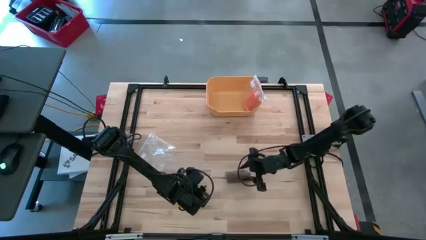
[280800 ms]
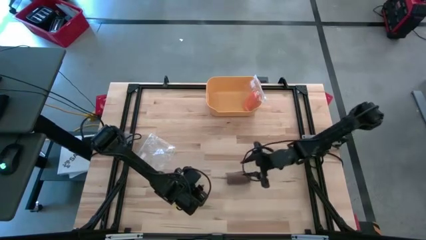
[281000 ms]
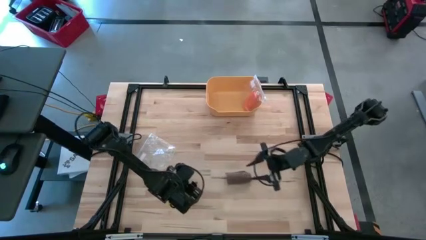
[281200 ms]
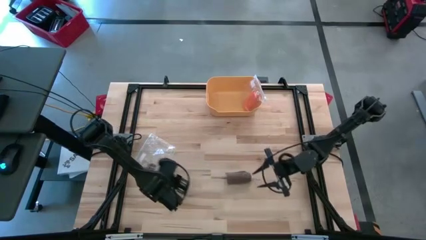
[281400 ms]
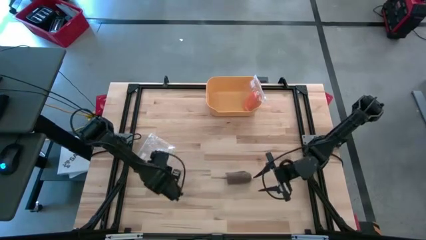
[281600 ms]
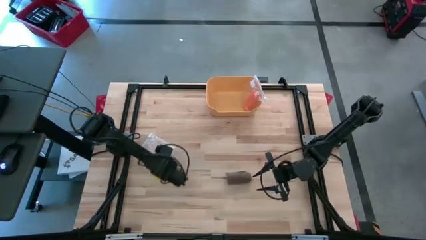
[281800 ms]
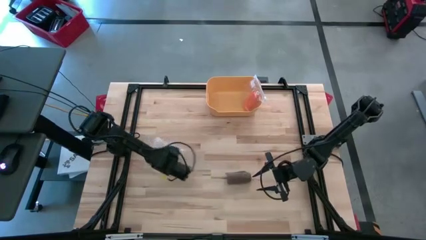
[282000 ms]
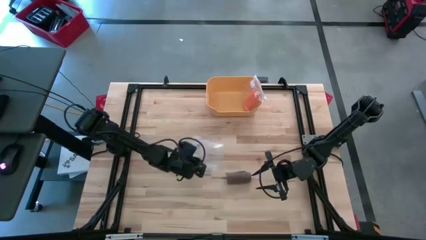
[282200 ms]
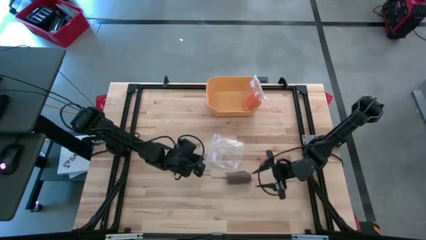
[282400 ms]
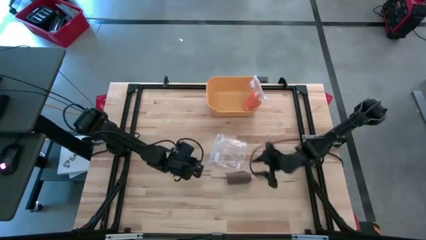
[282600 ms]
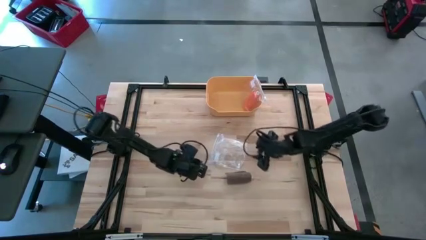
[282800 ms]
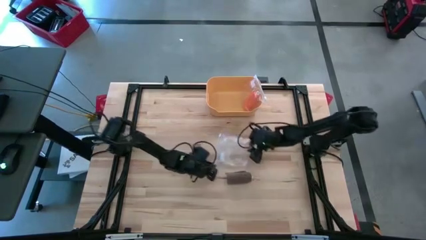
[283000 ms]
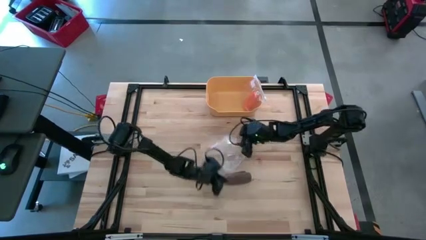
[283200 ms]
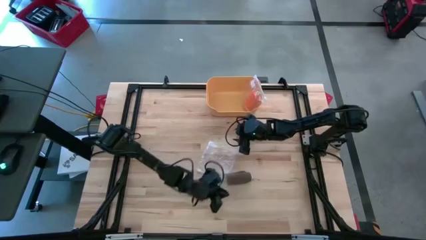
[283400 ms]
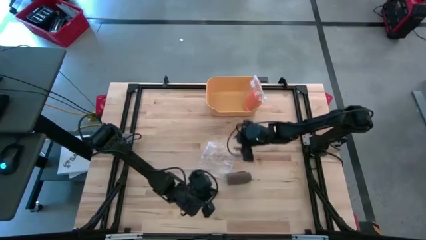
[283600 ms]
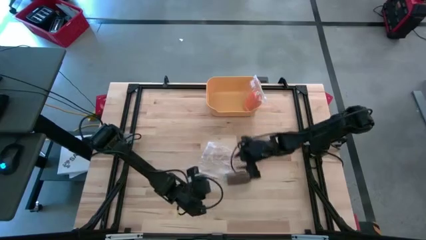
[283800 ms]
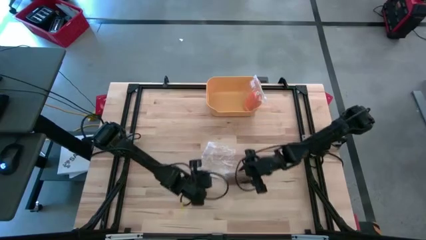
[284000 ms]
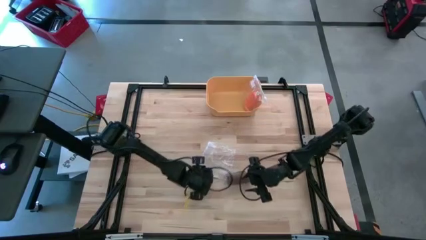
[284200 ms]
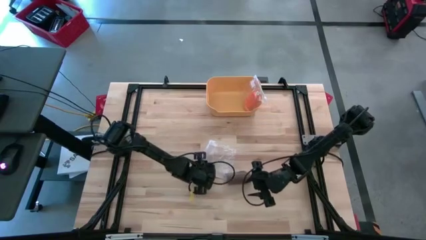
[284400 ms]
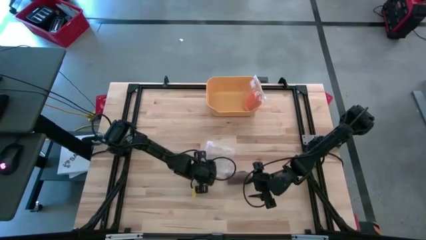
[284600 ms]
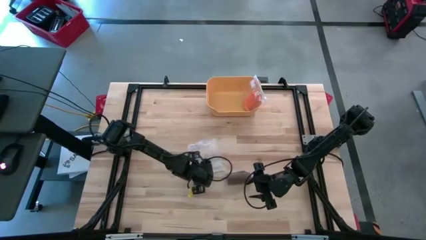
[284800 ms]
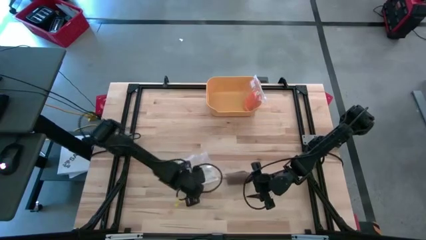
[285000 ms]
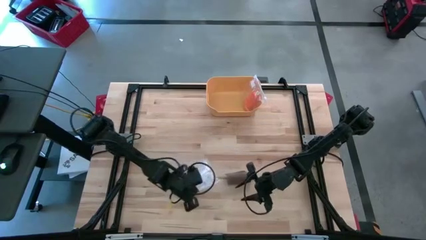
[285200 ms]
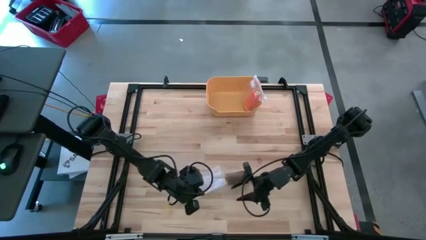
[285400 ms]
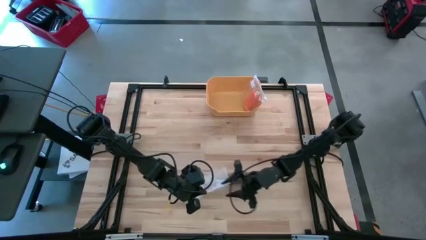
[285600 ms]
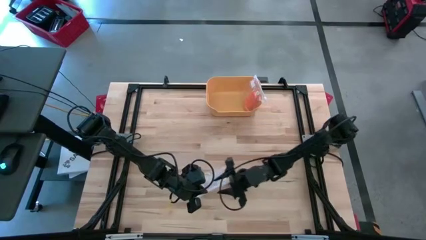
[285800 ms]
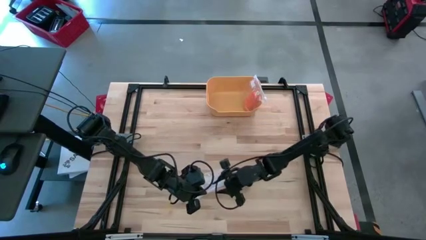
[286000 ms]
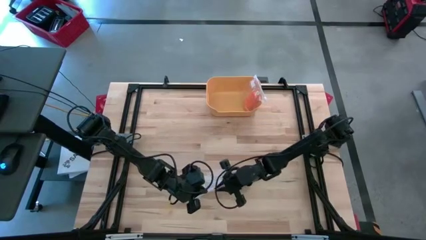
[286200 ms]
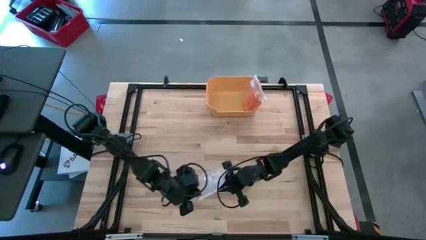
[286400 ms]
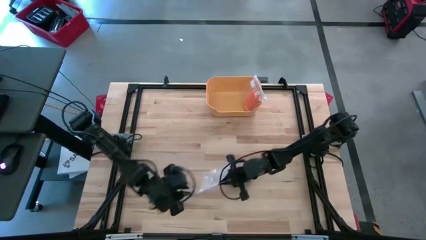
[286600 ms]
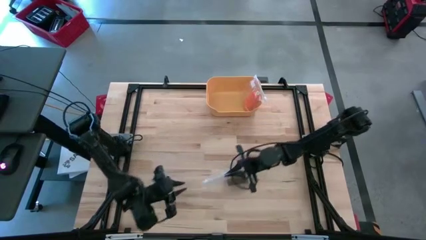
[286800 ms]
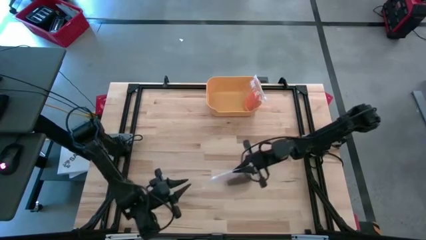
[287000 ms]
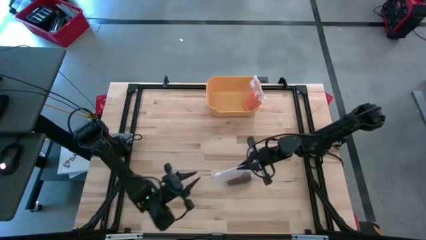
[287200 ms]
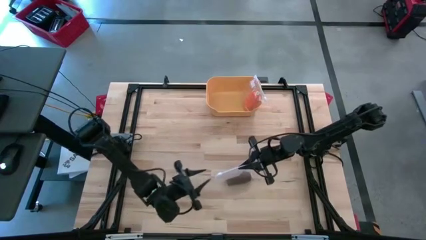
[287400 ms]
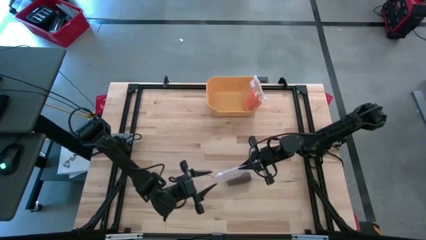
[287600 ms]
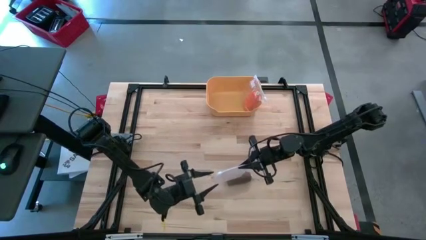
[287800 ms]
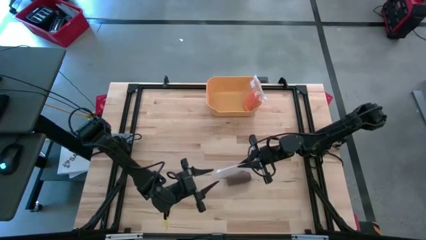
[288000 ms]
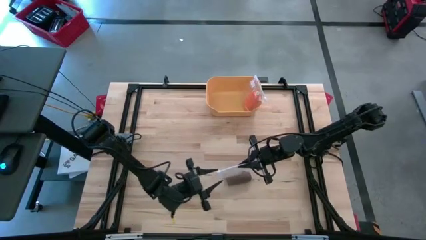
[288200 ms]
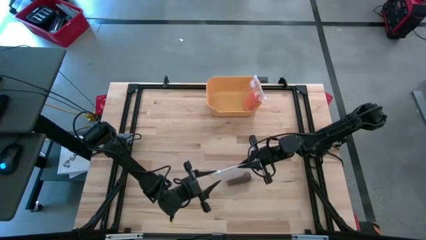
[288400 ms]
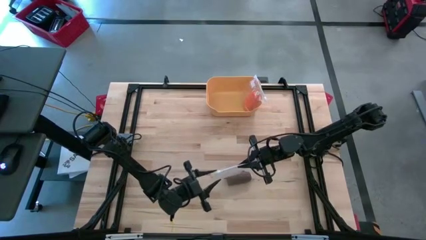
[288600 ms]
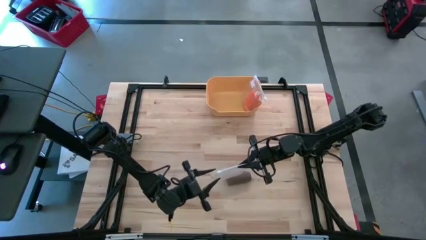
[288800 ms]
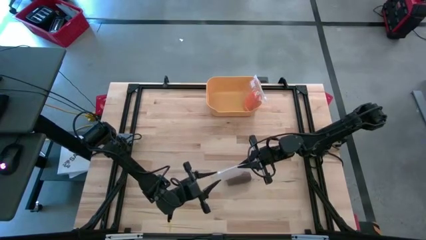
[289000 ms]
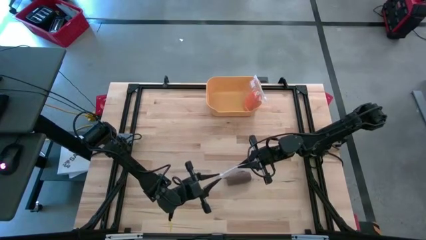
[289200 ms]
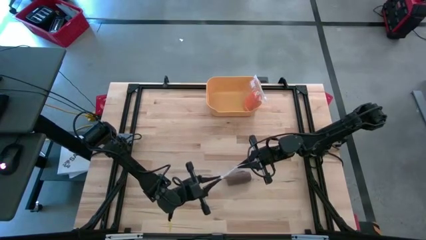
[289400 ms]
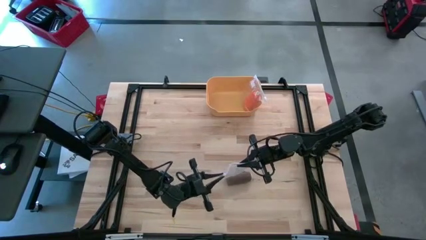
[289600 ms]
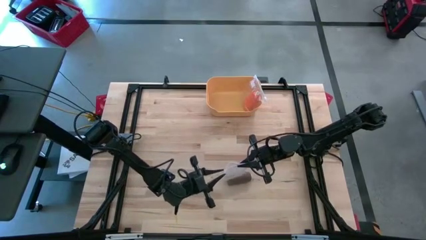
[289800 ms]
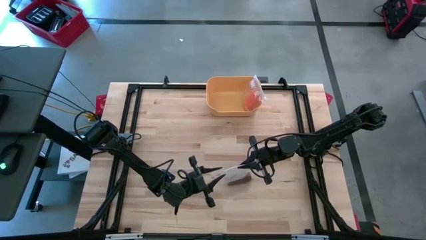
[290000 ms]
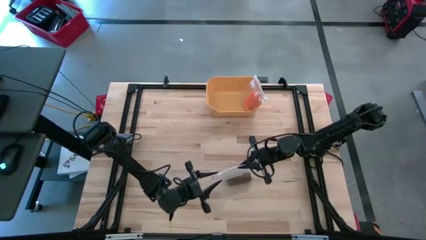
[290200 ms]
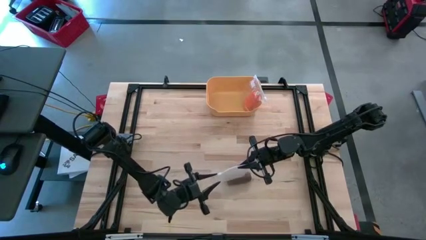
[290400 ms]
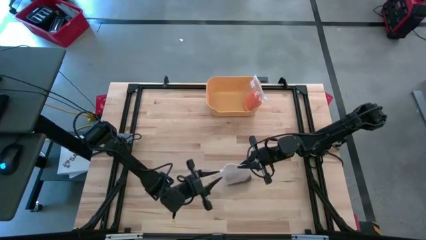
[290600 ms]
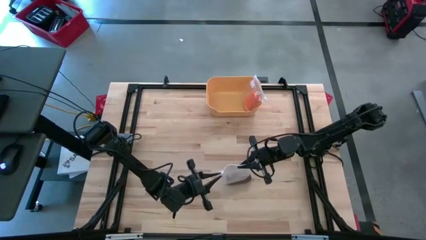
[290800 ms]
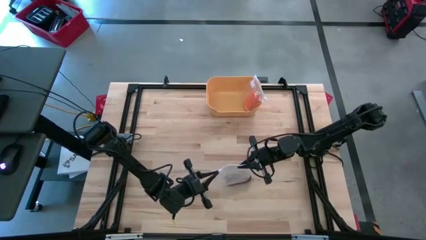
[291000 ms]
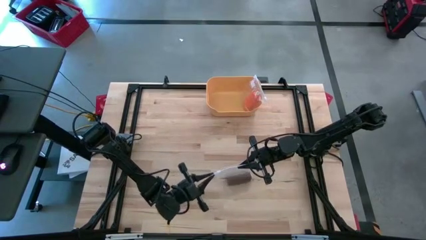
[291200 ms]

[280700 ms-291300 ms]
Task: Roll bandage
Open the transparent zip bag

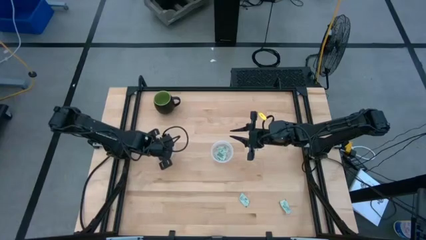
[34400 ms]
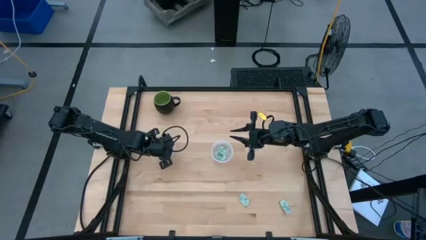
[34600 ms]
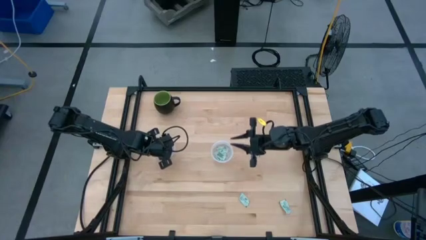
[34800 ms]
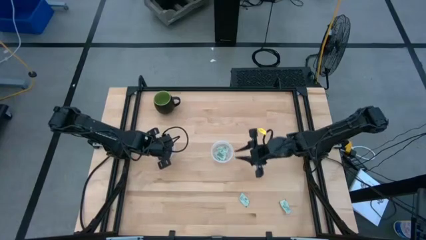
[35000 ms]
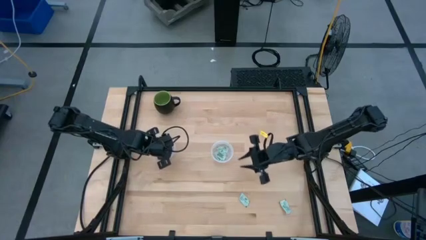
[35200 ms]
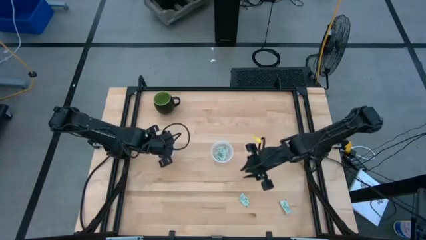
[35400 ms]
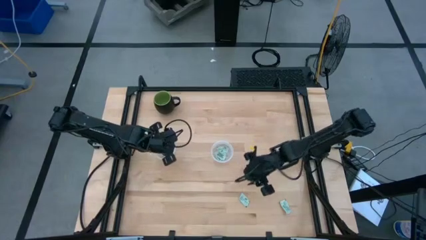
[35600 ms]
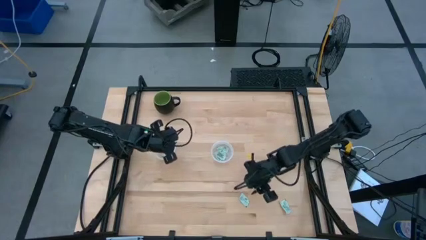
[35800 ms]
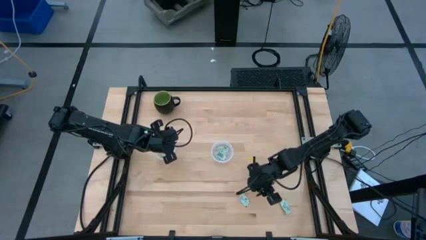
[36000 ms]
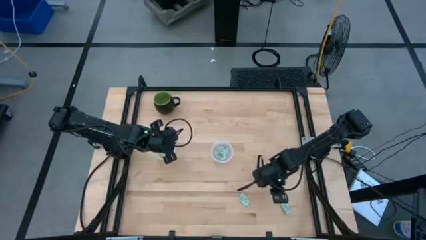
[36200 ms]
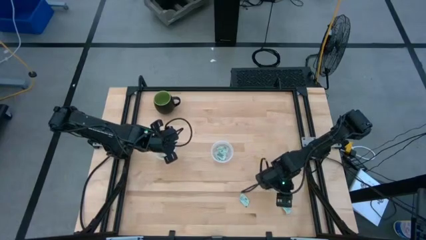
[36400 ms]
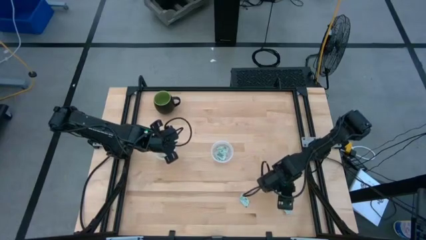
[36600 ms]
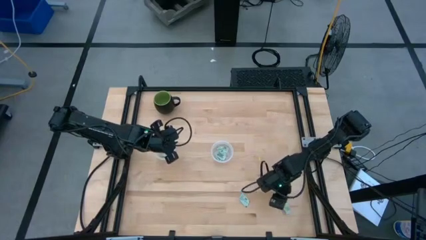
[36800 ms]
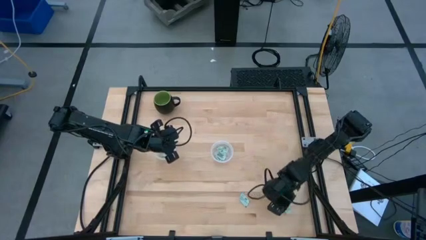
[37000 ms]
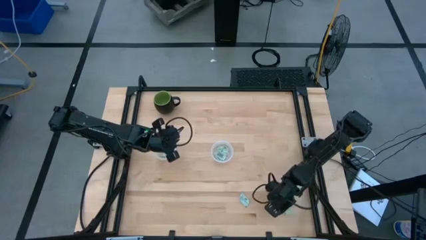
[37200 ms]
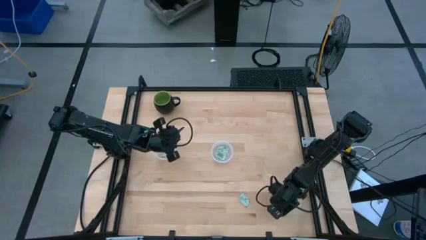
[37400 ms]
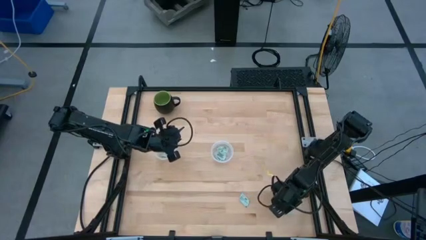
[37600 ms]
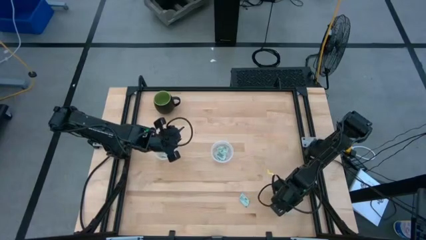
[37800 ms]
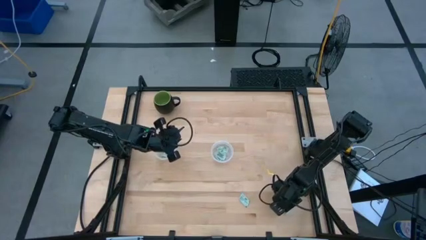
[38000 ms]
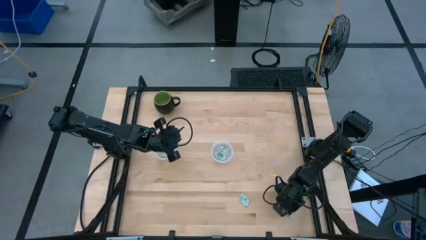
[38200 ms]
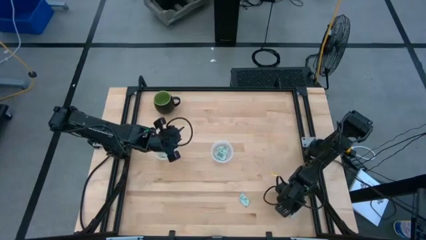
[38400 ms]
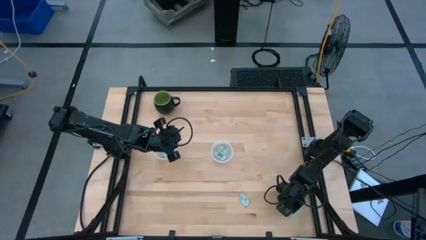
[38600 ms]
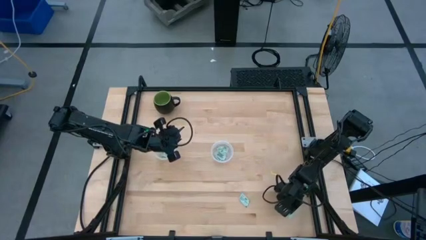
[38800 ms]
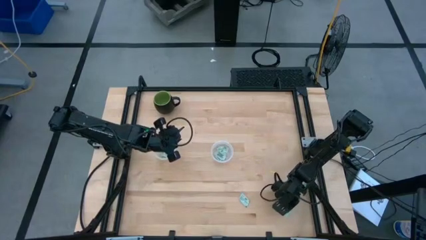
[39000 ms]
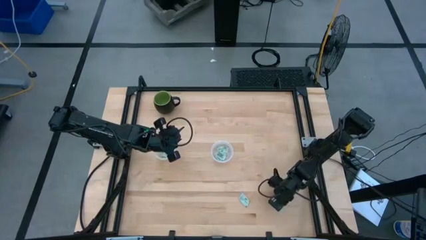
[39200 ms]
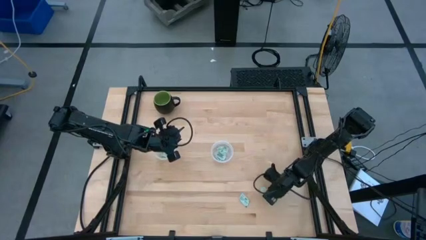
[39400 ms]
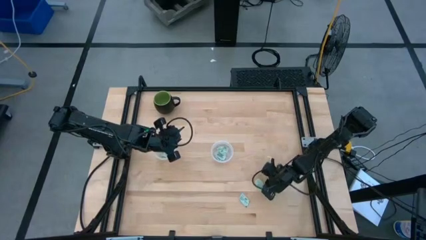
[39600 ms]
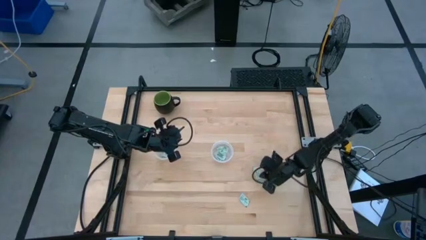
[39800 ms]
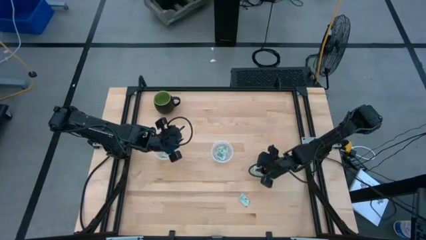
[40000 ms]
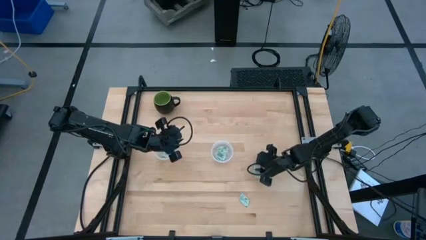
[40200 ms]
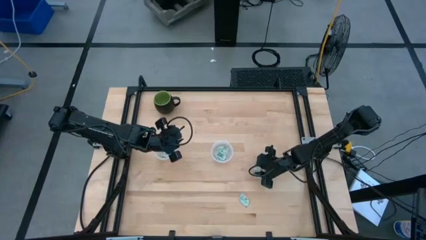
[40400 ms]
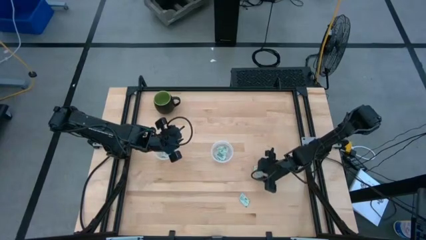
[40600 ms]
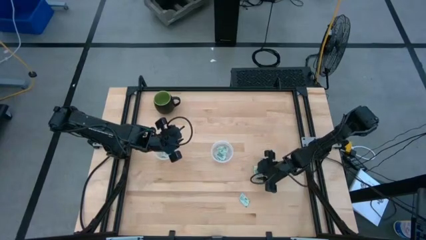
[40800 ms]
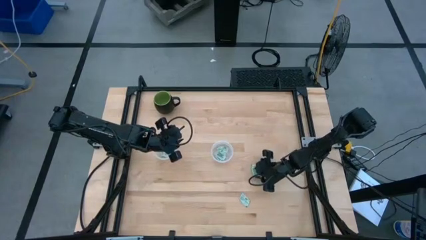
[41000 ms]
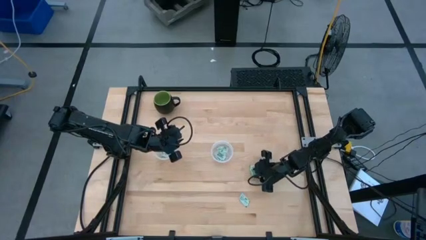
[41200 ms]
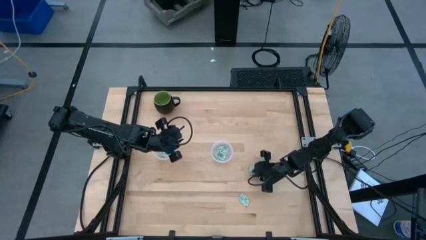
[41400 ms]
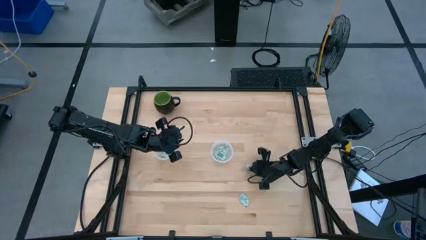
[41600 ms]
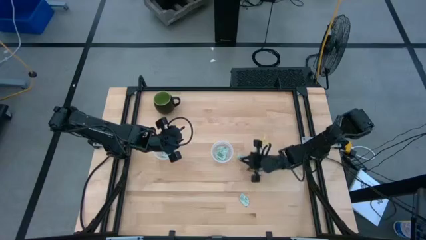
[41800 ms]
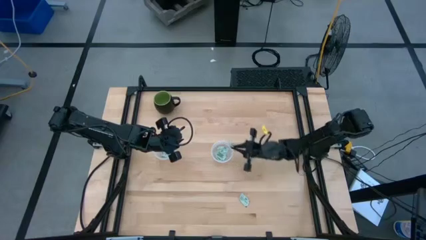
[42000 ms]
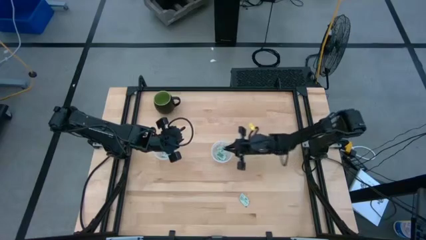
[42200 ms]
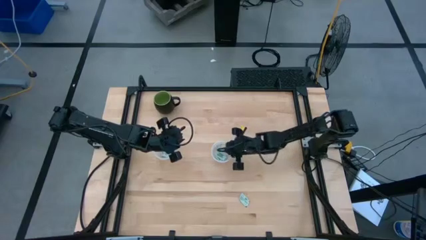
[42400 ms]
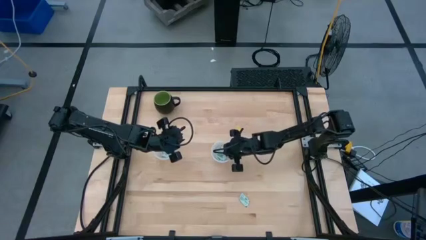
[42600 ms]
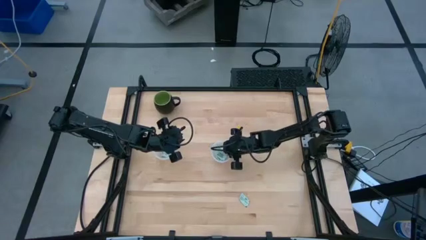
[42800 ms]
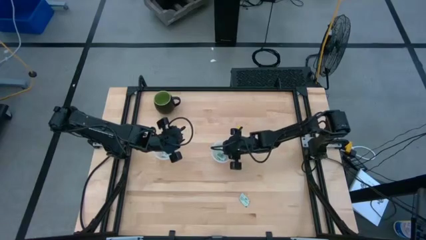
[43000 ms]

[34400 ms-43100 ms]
Task: Pick and place Stevia / Truvia into bins
Put the white stevia packet into the right transparent container
